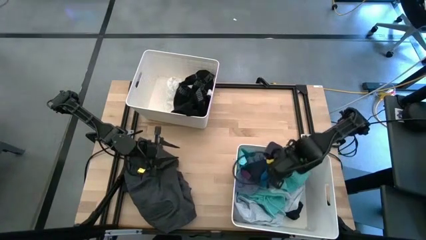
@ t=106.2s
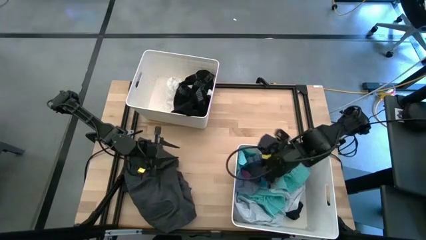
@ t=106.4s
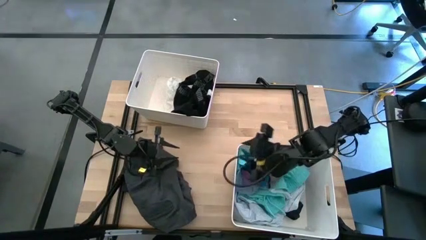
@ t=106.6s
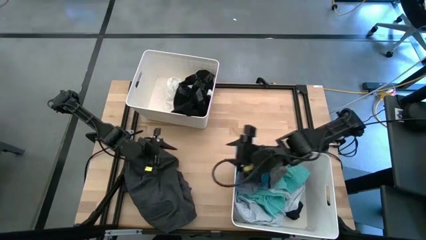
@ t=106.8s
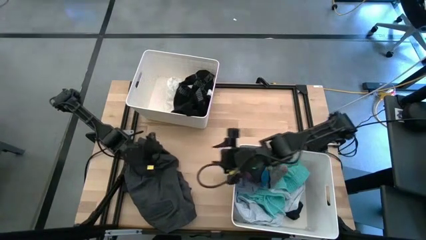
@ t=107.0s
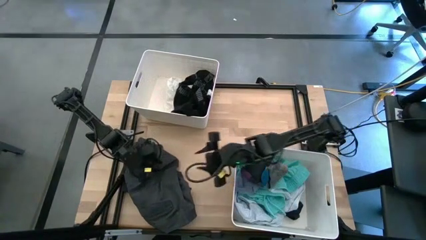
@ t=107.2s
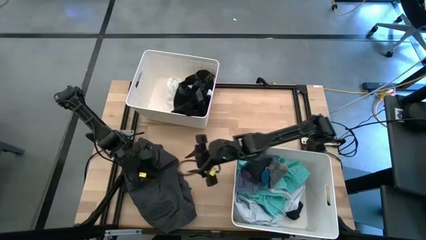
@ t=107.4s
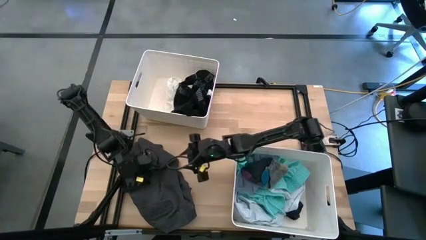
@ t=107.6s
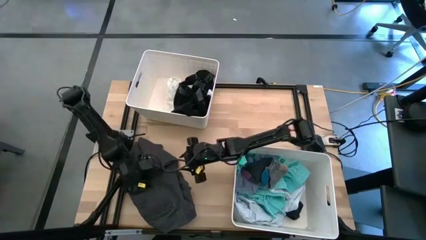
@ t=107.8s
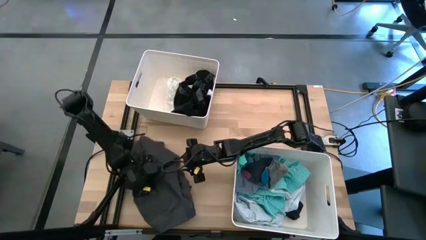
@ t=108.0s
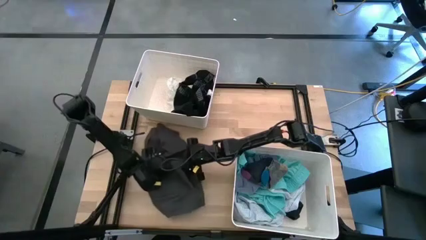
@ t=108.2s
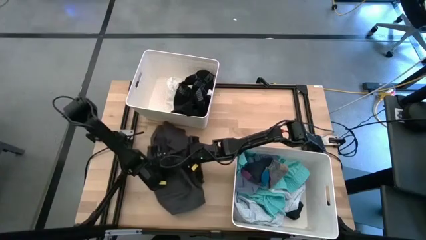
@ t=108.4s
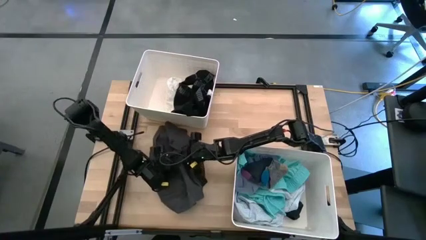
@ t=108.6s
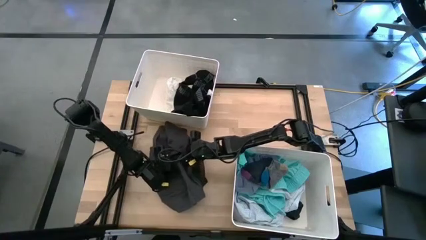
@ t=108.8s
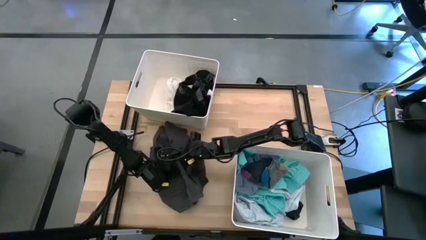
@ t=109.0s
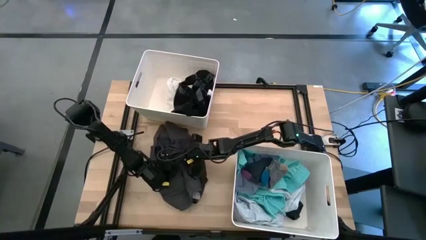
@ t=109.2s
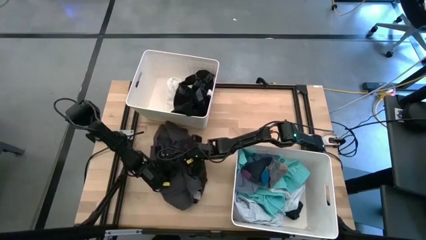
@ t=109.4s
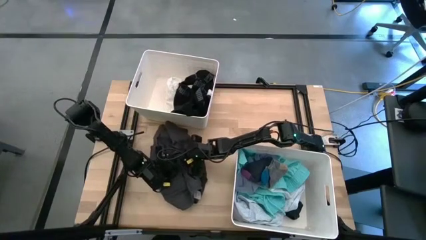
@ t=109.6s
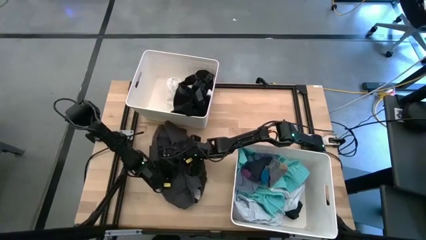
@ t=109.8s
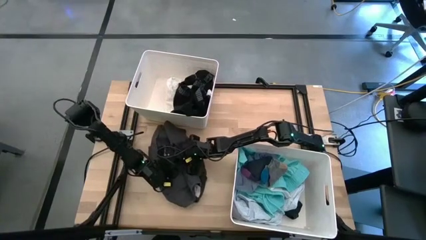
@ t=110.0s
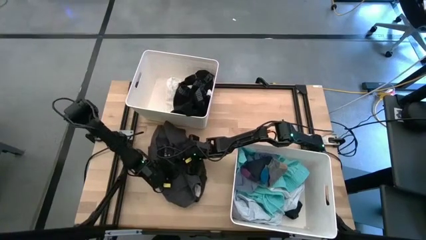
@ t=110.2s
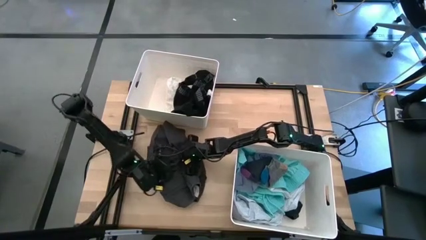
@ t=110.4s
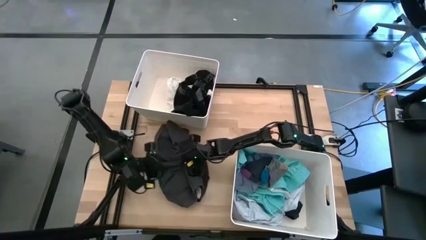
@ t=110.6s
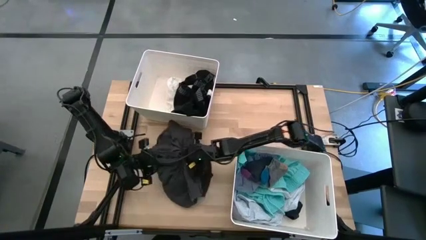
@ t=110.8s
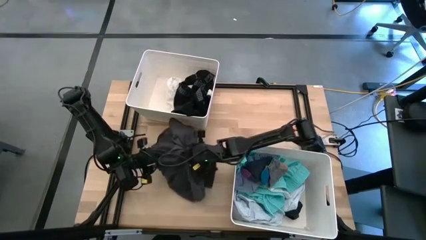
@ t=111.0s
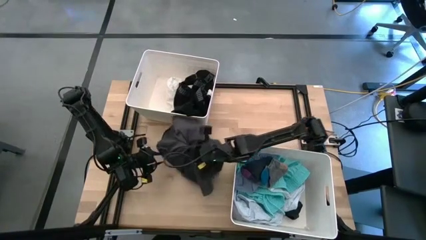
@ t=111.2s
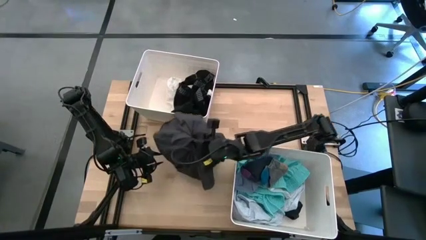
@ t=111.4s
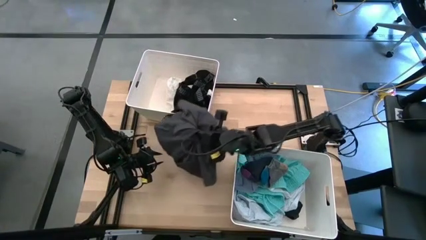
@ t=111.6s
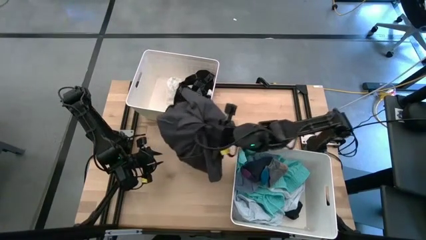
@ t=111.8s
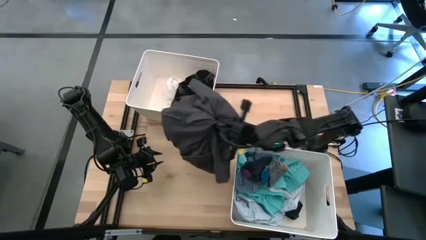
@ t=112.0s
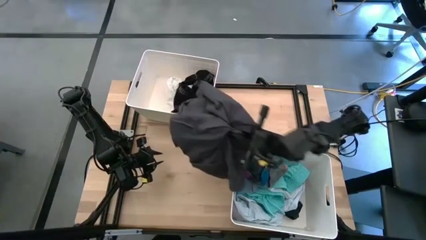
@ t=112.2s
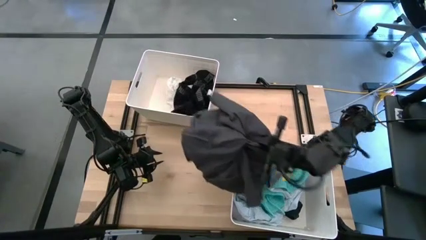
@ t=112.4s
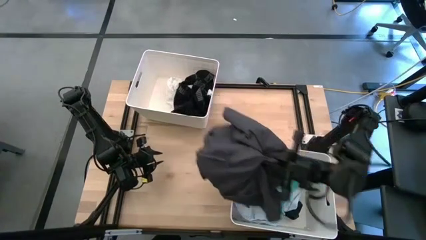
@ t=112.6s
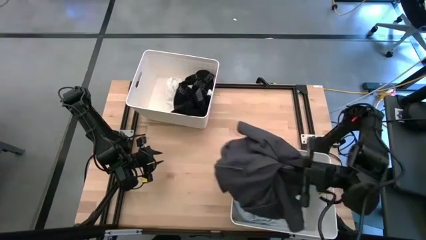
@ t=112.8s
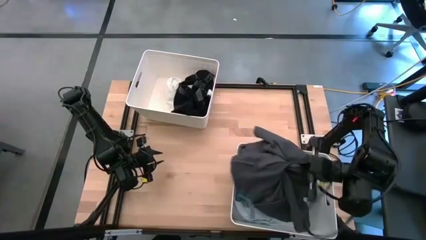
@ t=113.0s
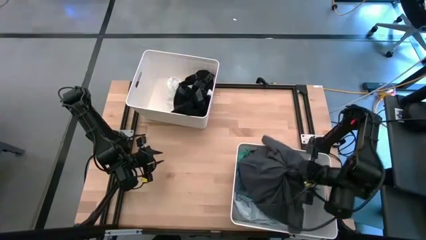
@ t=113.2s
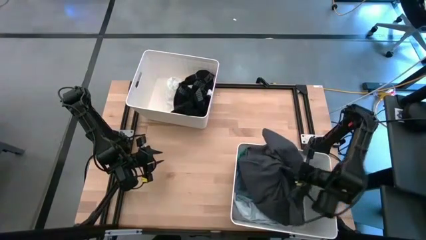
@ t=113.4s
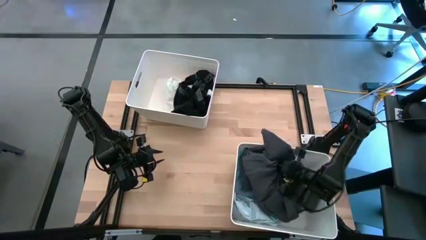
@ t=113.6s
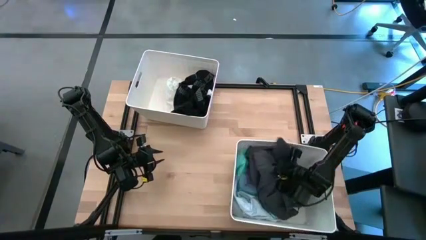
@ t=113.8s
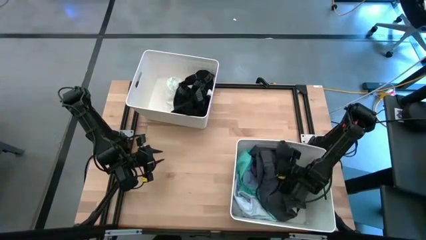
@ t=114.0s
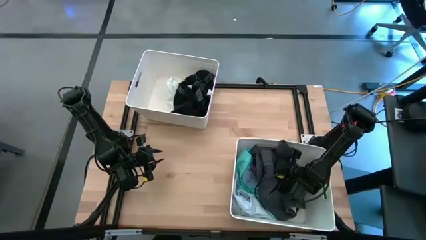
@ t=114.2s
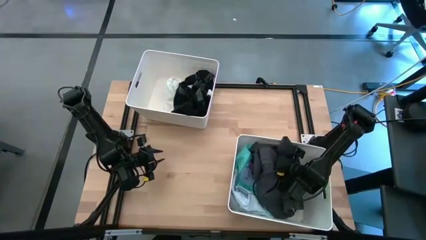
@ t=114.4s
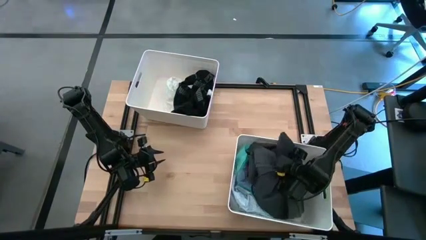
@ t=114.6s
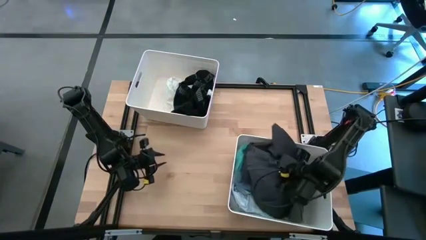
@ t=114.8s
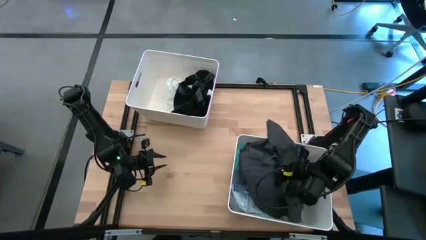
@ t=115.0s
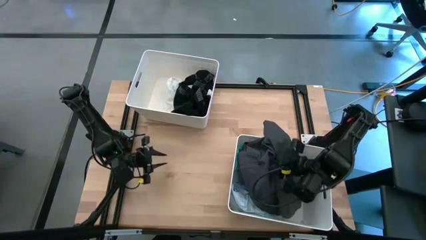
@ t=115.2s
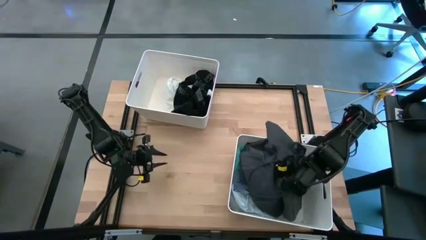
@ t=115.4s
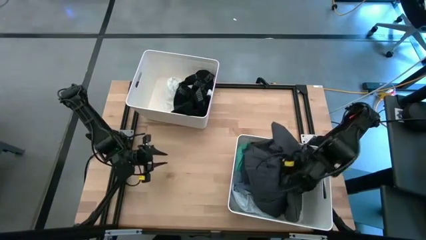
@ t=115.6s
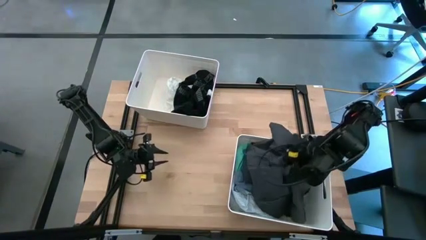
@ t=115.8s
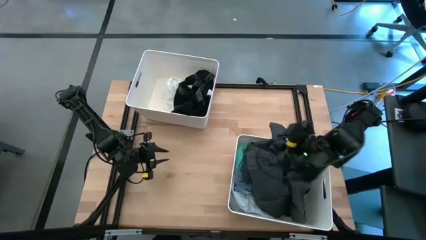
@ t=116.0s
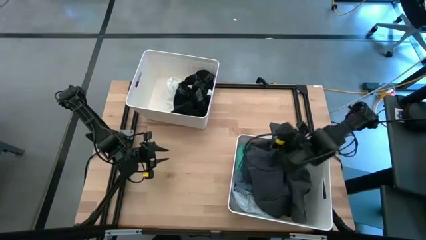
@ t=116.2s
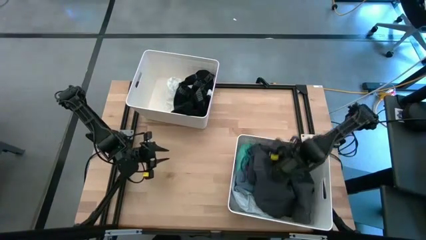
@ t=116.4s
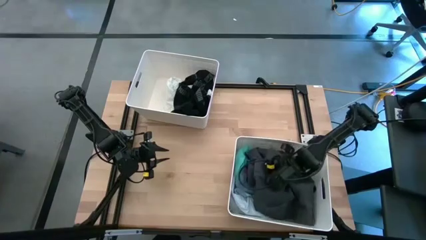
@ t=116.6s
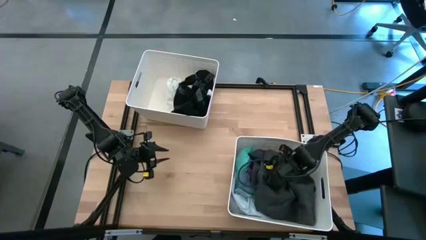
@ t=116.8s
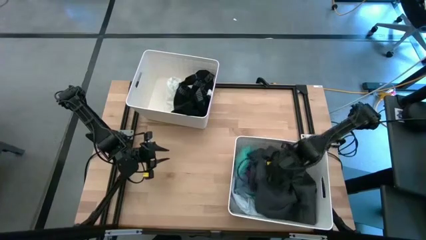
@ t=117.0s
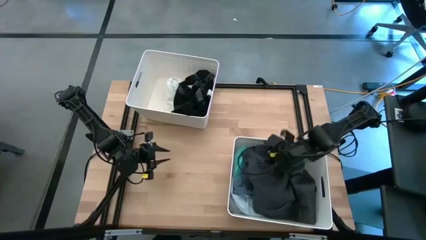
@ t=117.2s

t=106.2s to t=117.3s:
Task: Sort clothes
Put the black pants into the bottom white bin
